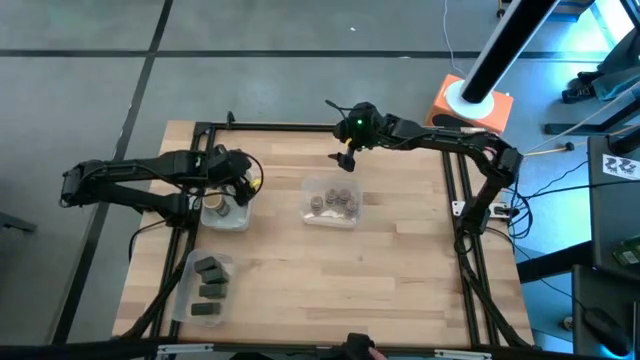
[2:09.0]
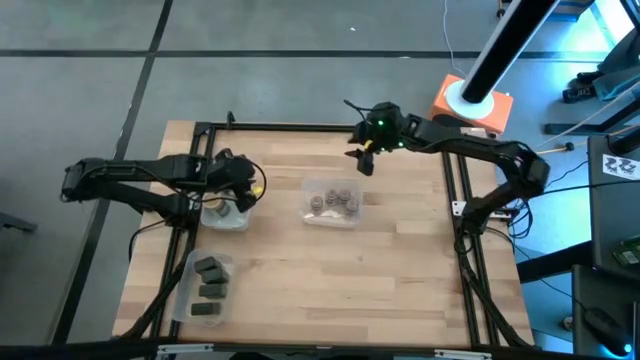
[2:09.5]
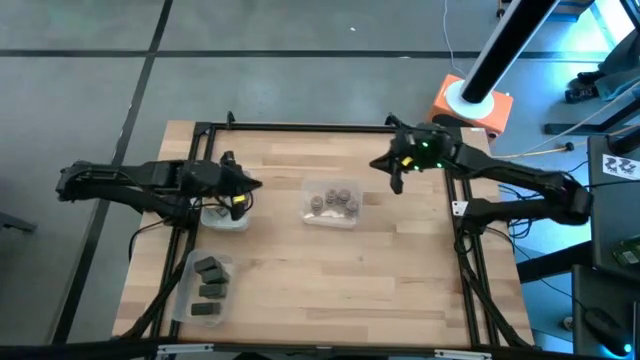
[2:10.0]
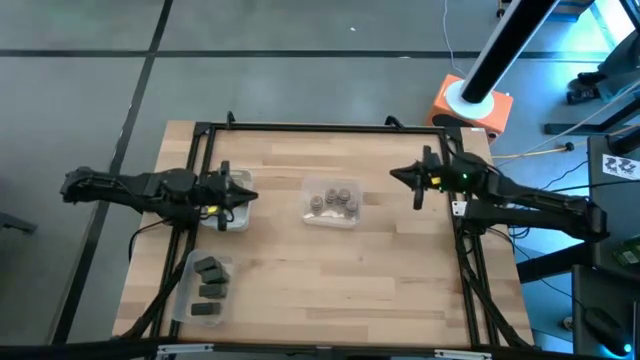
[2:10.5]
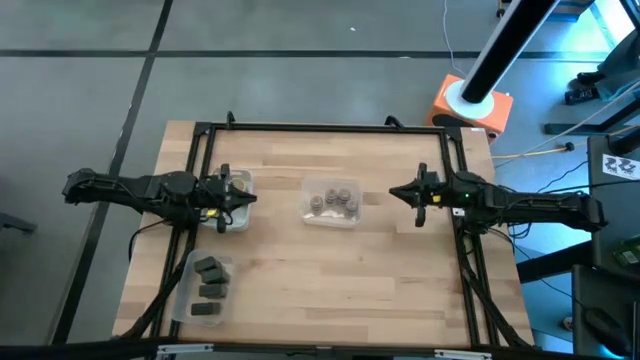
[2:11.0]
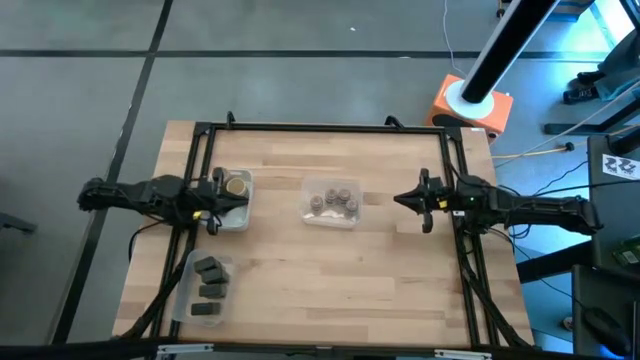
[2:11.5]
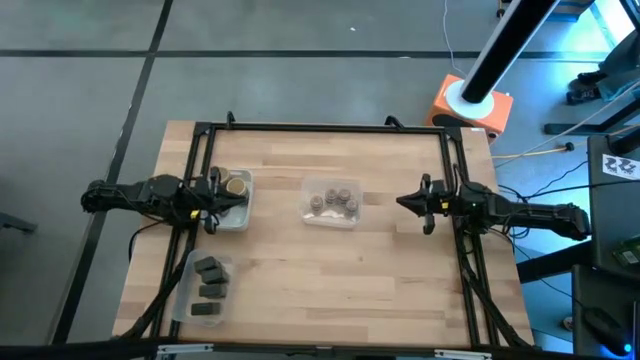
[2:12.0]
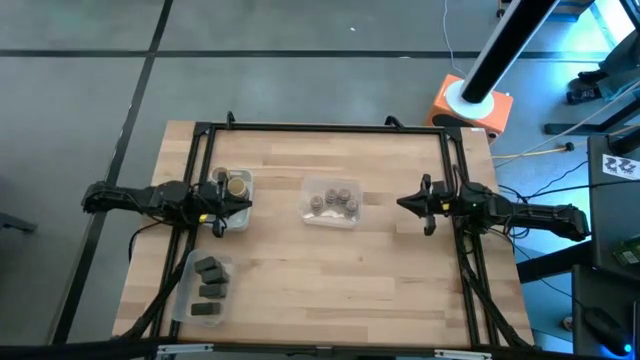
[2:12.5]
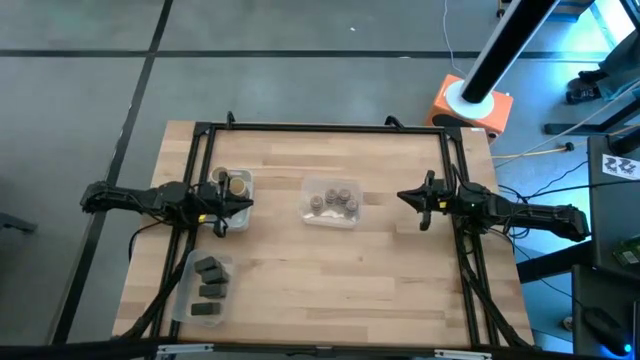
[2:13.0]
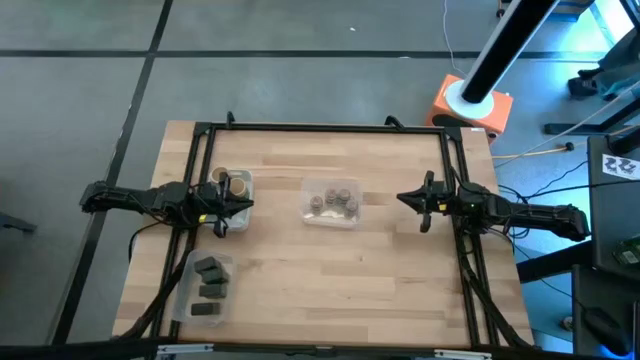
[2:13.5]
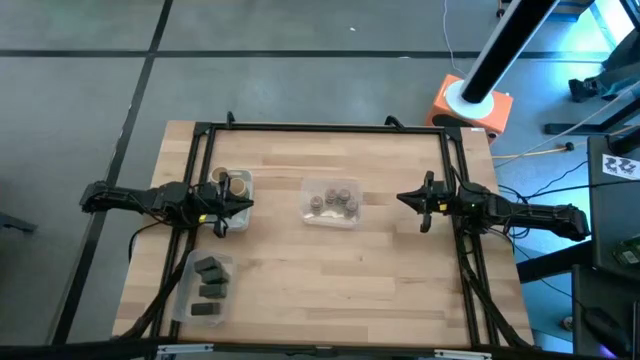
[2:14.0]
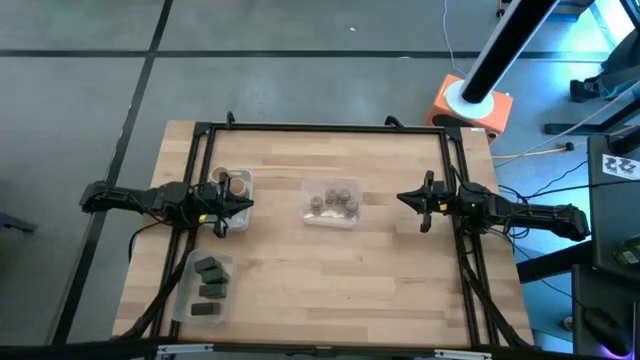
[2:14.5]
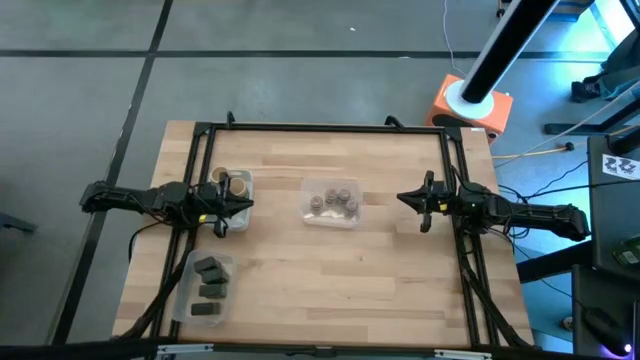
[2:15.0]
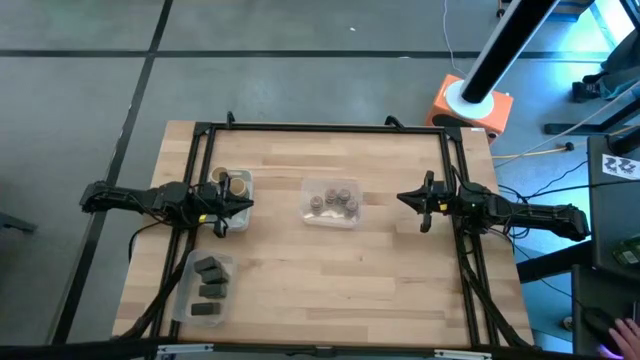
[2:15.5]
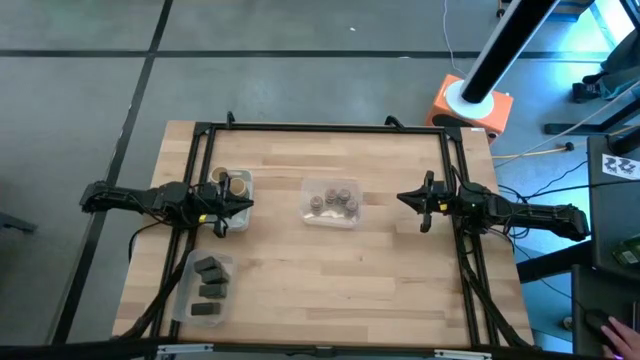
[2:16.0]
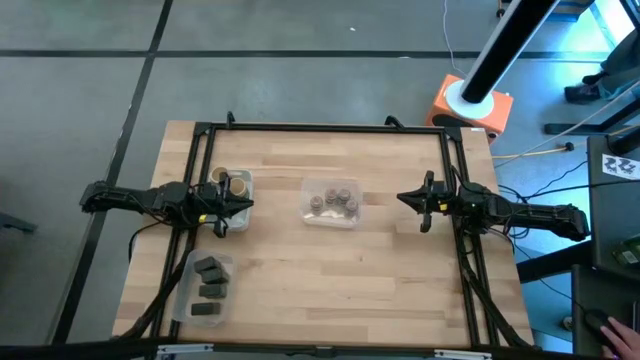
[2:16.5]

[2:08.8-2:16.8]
Task: Sort spices by type
Return to Home Position

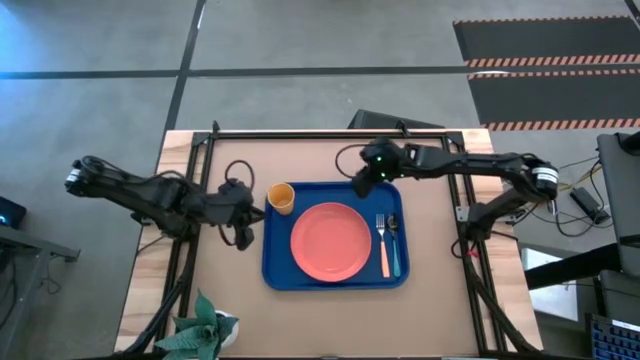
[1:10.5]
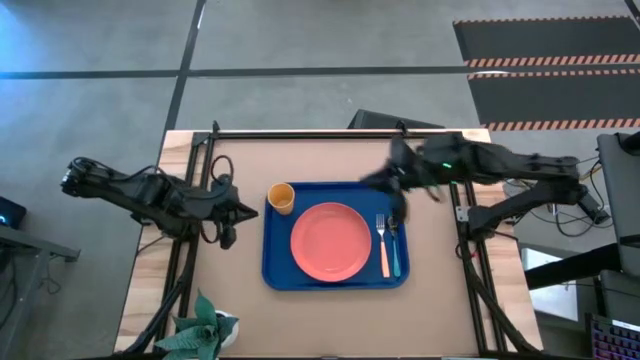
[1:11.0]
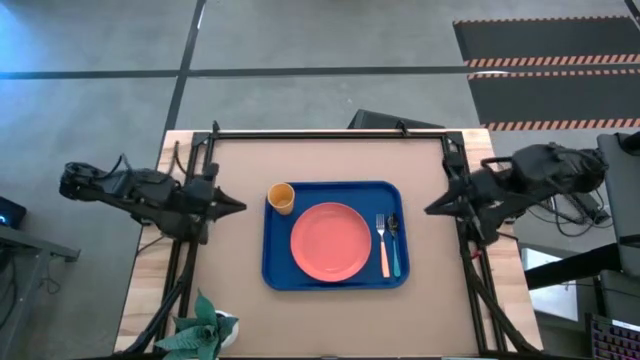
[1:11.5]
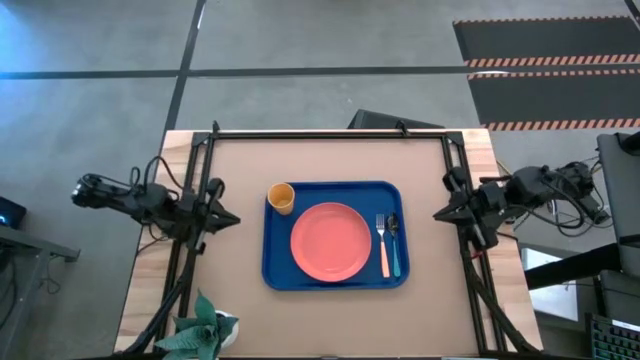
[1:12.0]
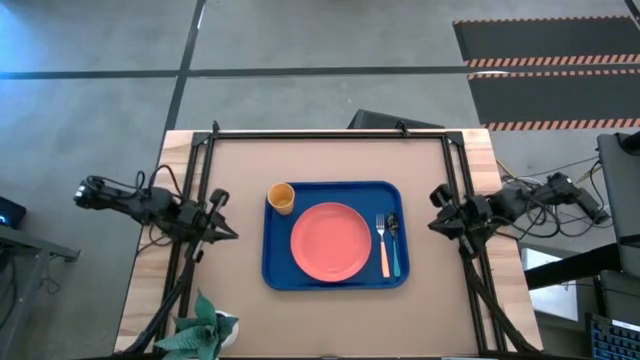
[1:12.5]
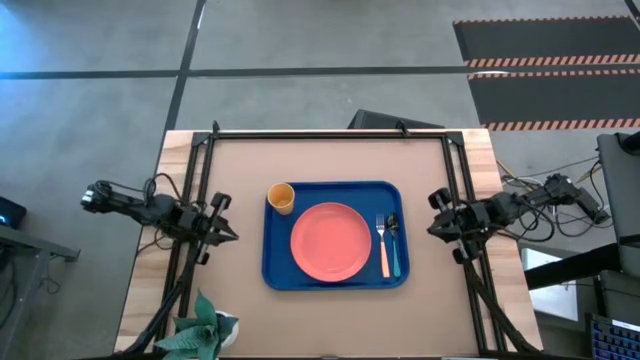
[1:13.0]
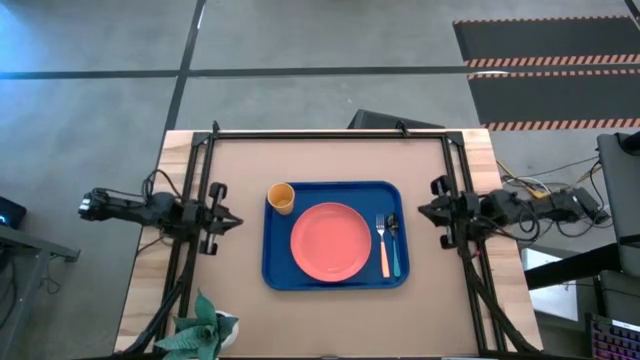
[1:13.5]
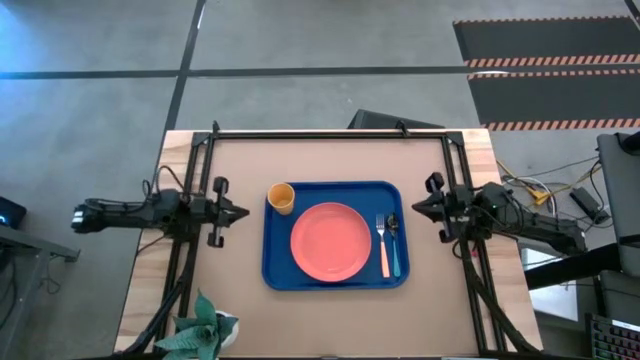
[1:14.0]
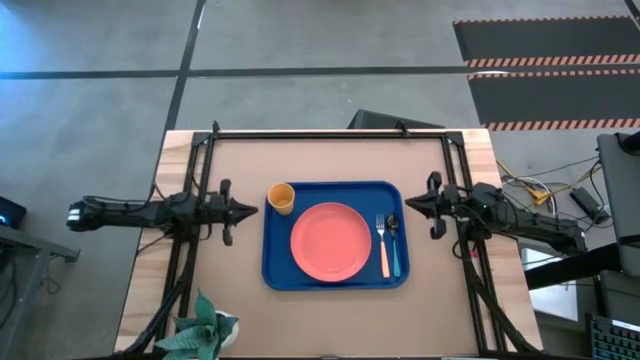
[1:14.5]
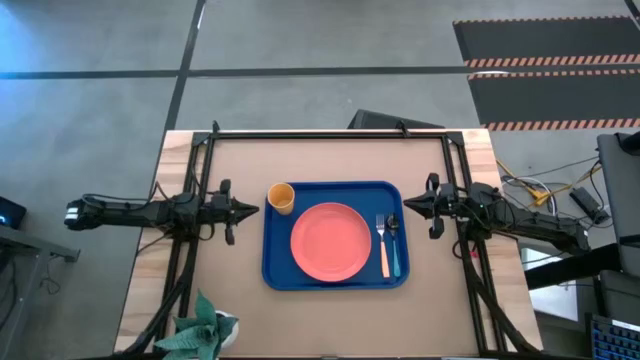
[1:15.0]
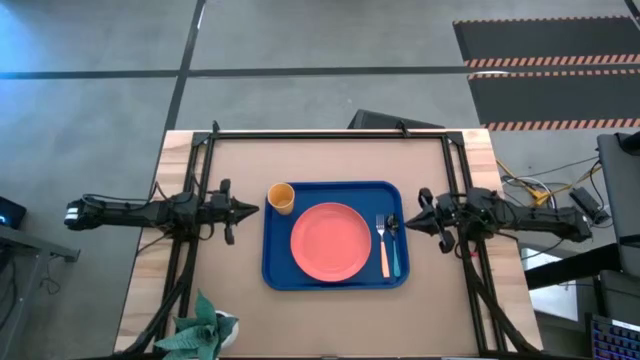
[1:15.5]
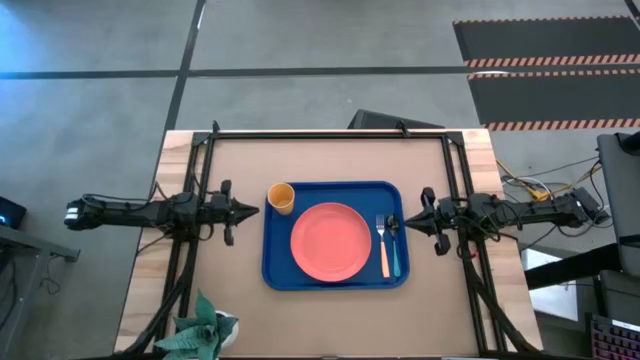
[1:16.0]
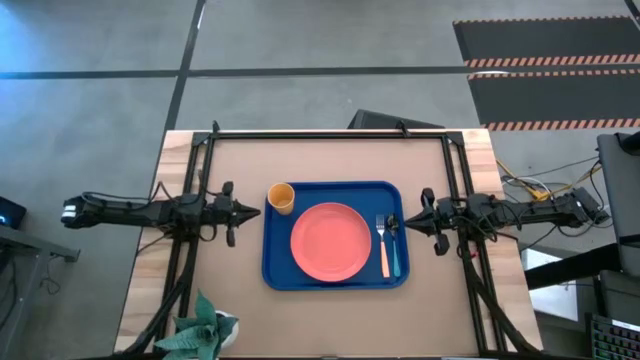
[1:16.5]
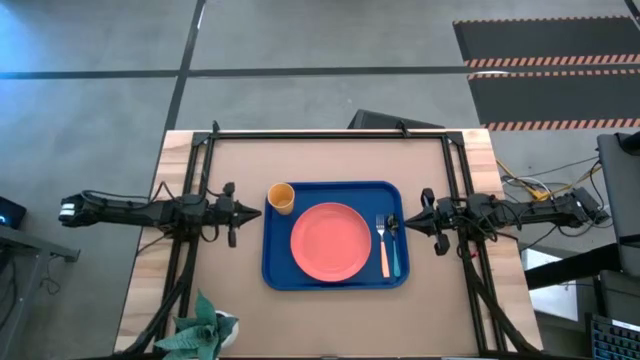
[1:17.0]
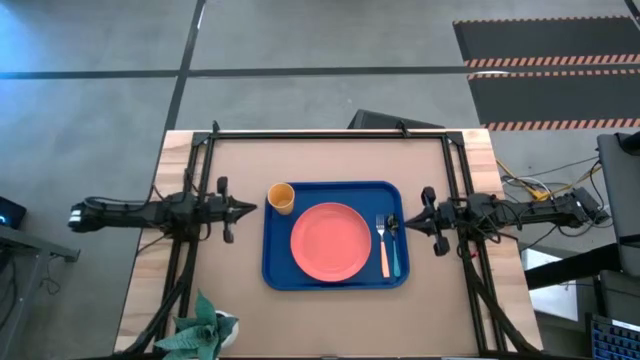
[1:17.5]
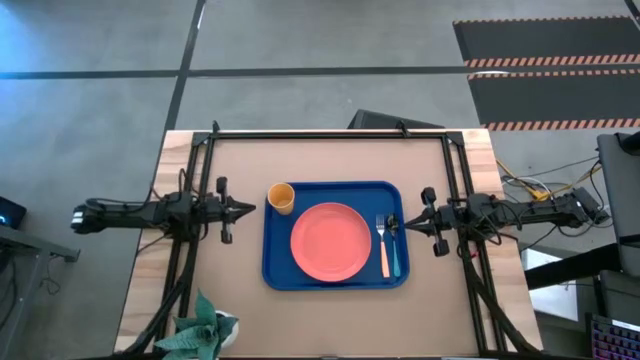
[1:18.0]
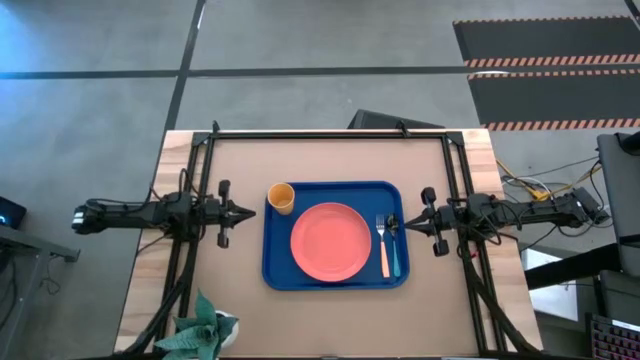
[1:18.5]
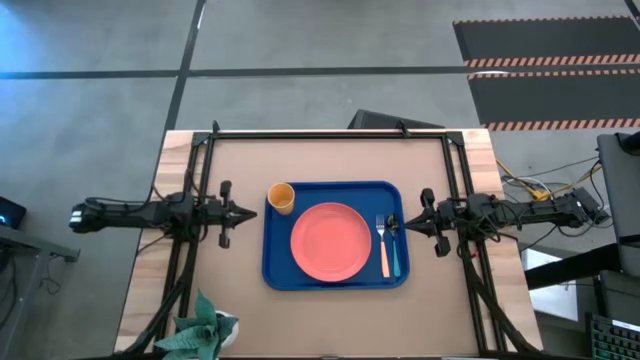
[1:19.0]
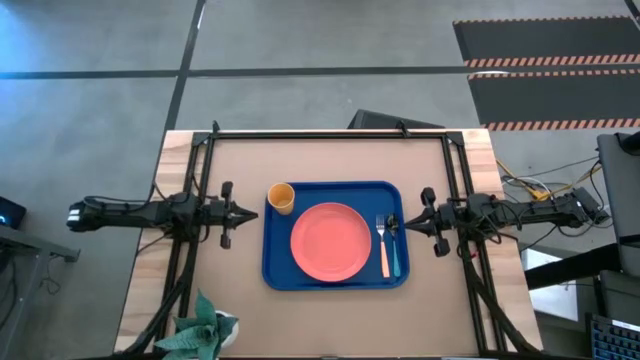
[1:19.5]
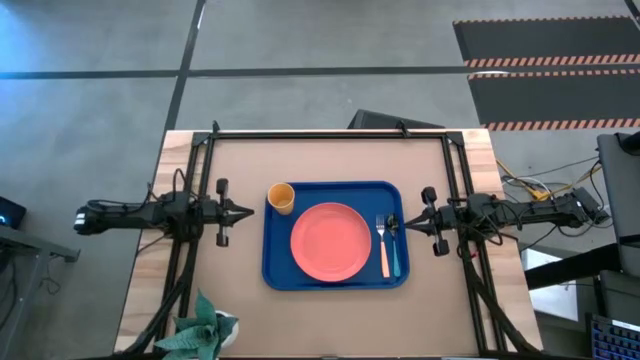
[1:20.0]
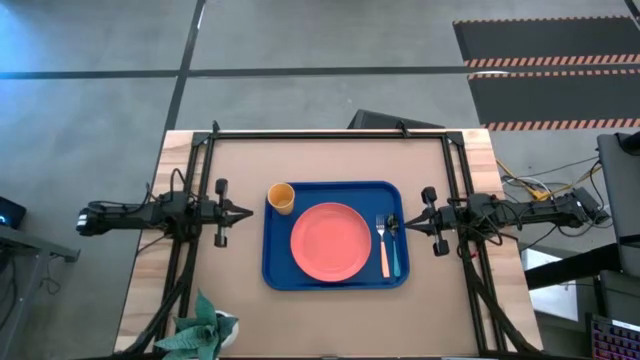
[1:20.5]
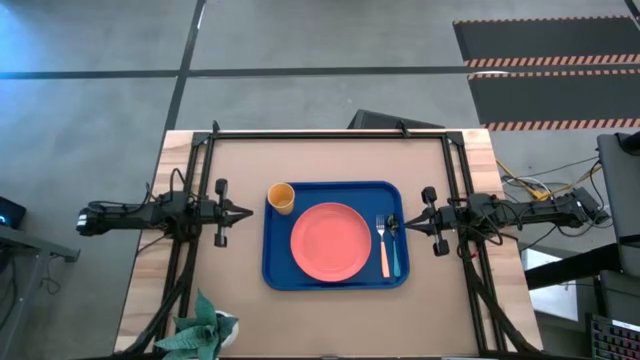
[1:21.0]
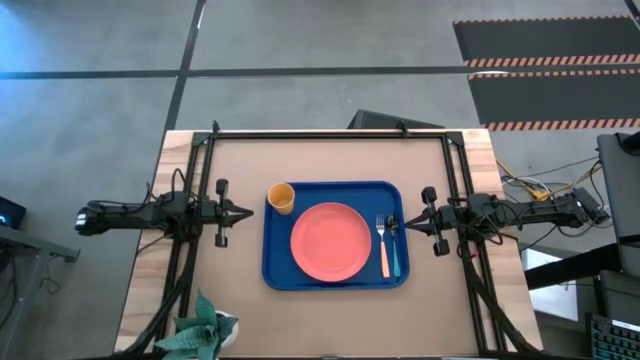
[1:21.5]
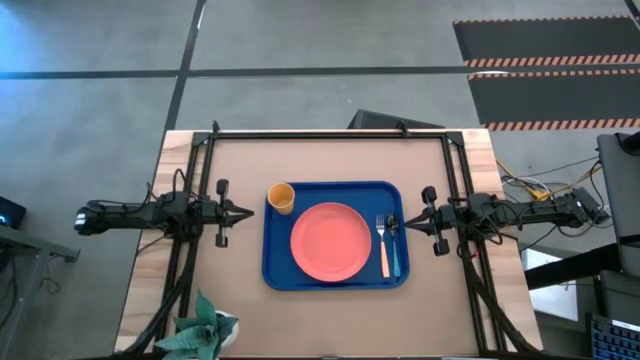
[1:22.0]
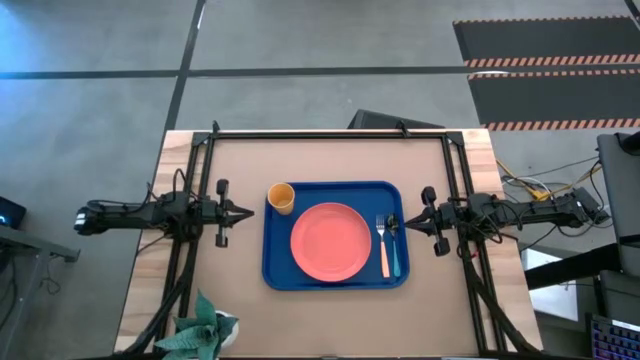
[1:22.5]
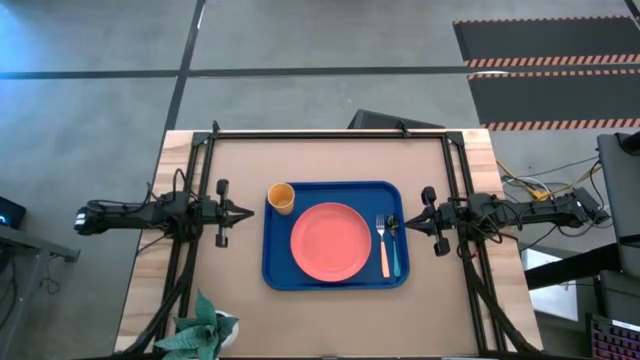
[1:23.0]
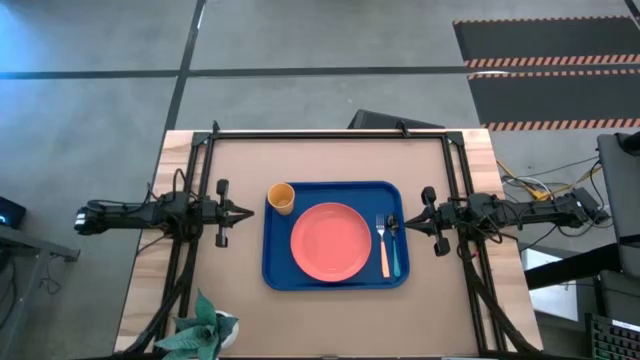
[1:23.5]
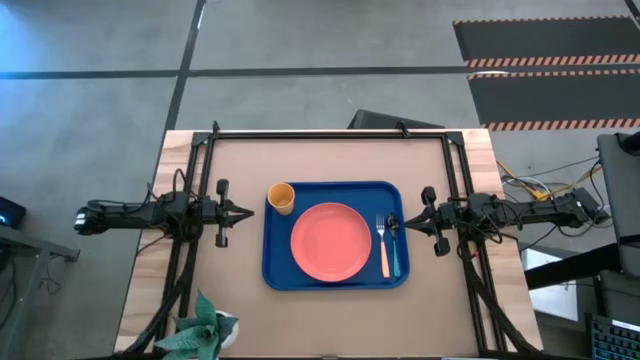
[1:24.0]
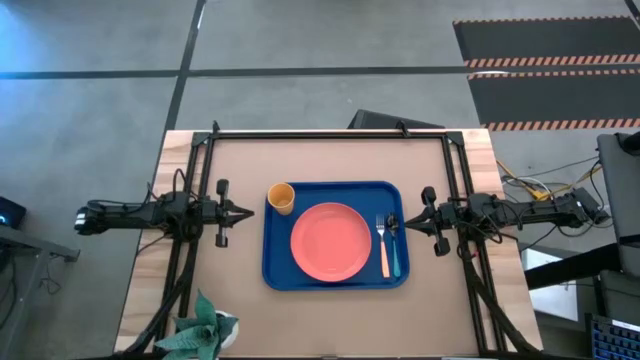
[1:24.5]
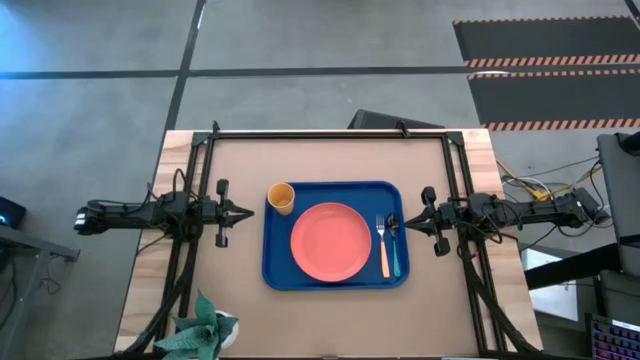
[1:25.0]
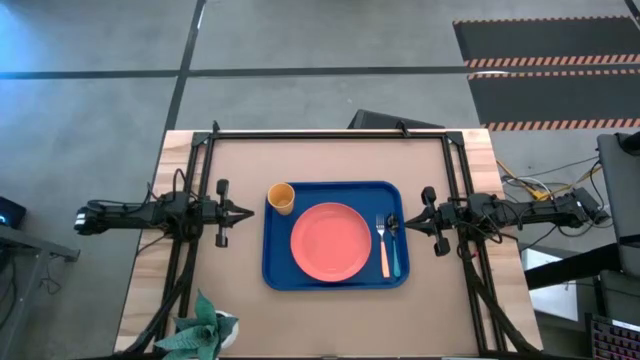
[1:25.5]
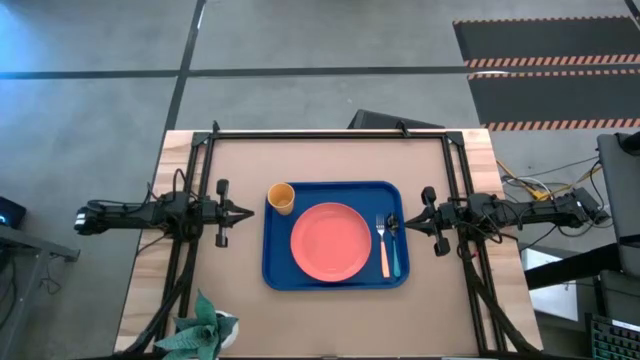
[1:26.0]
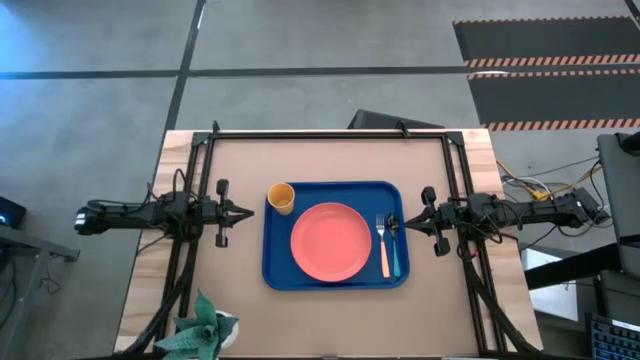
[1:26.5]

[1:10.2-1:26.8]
Task: Pick and place plate/cup/fork/spoon on tray
Return to Home Position
